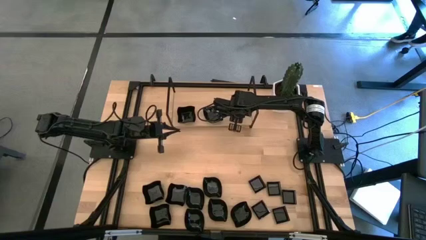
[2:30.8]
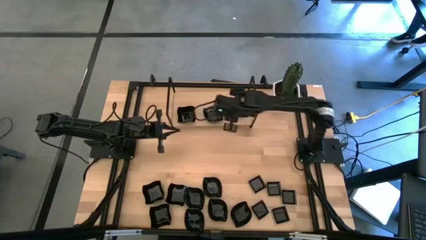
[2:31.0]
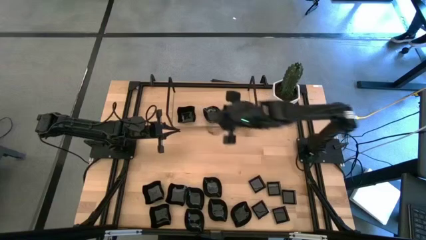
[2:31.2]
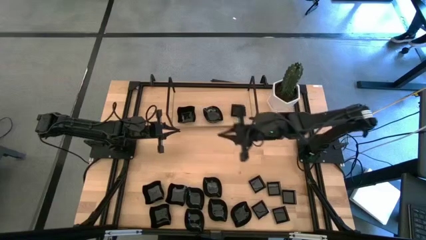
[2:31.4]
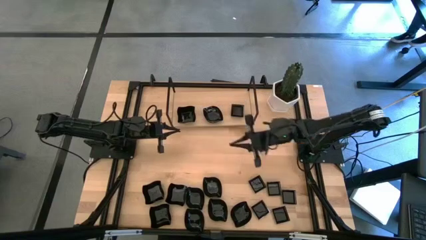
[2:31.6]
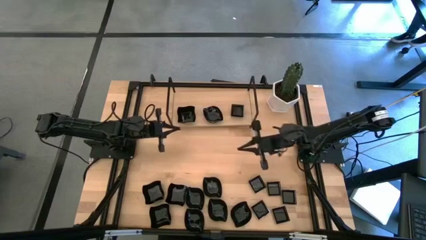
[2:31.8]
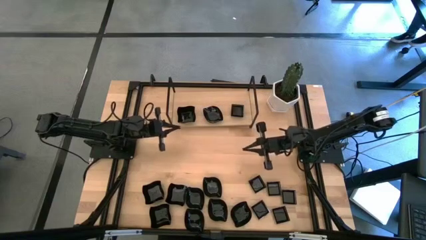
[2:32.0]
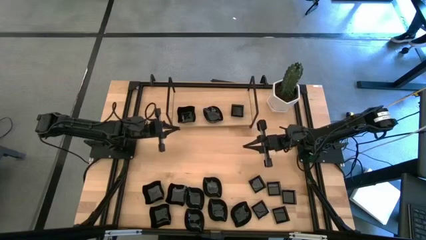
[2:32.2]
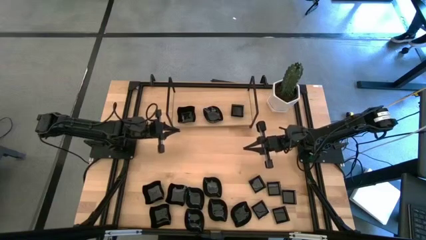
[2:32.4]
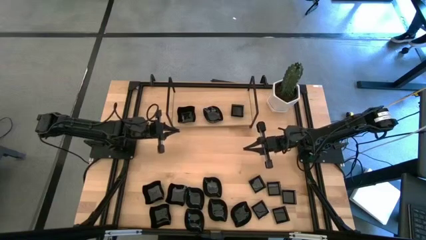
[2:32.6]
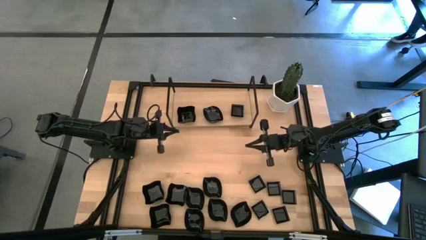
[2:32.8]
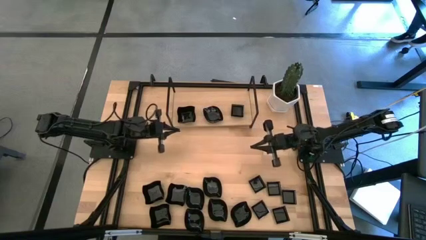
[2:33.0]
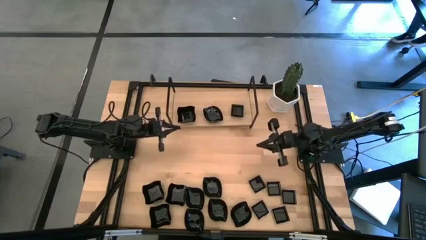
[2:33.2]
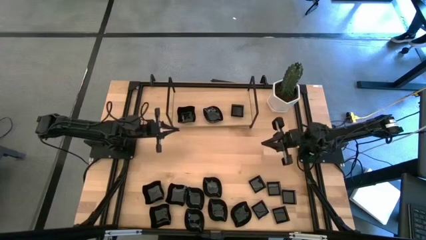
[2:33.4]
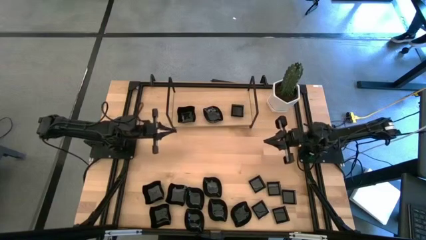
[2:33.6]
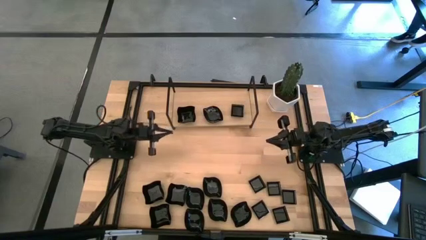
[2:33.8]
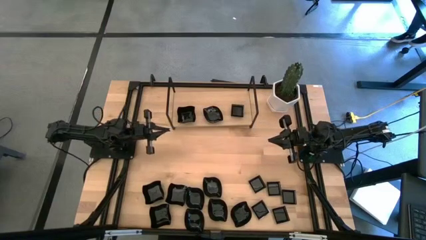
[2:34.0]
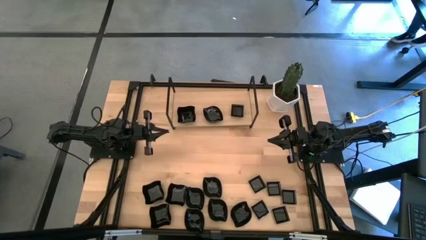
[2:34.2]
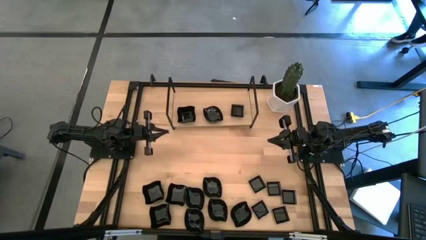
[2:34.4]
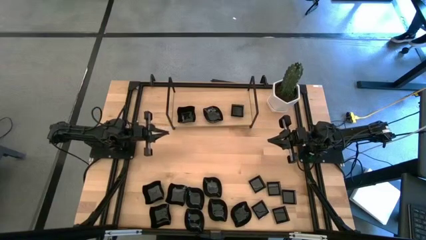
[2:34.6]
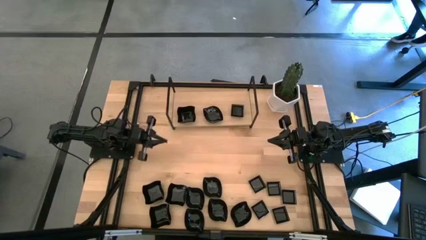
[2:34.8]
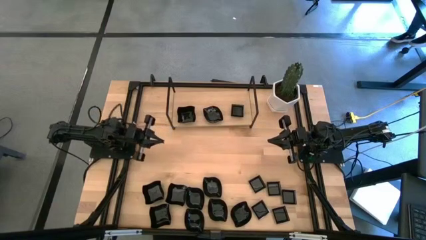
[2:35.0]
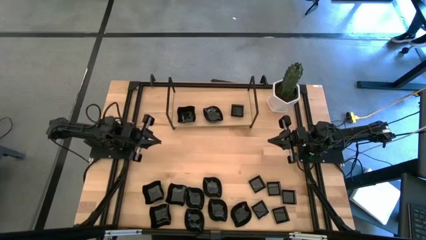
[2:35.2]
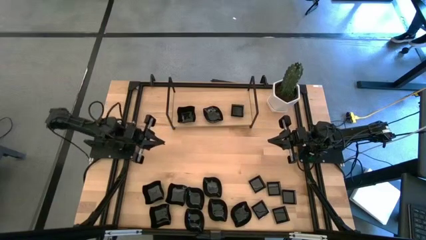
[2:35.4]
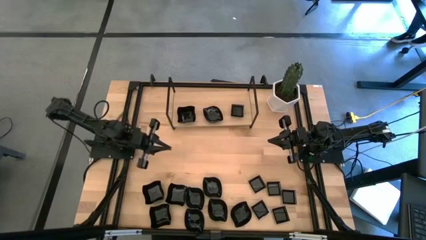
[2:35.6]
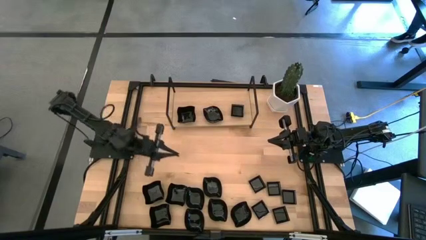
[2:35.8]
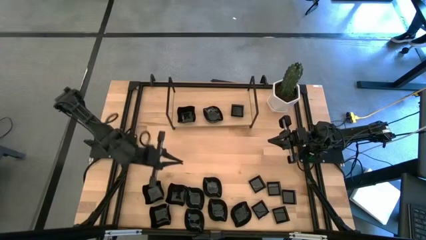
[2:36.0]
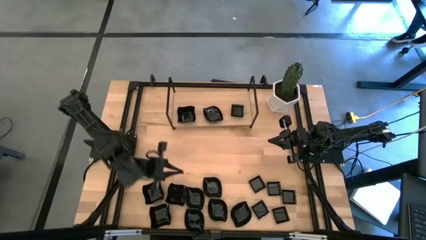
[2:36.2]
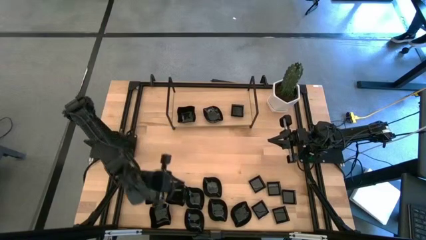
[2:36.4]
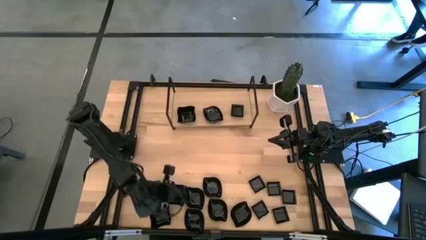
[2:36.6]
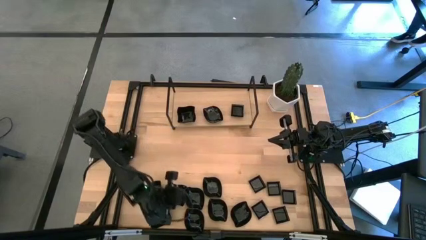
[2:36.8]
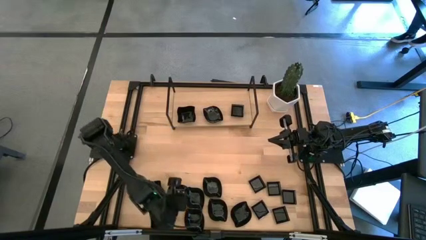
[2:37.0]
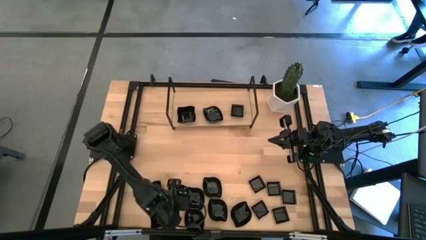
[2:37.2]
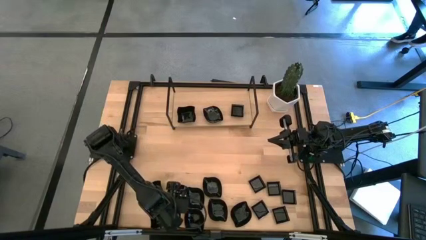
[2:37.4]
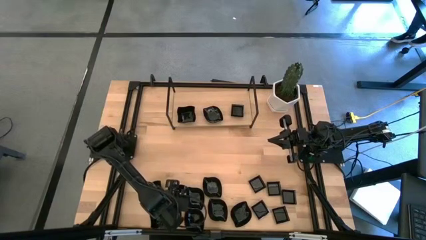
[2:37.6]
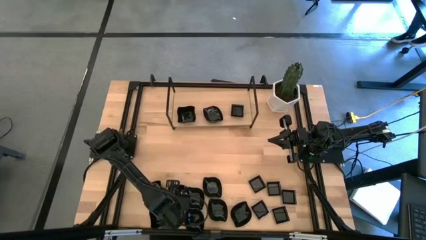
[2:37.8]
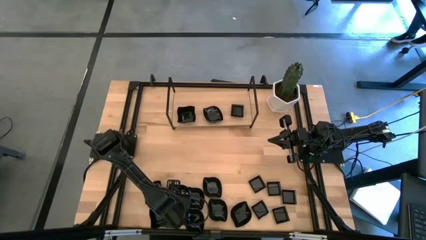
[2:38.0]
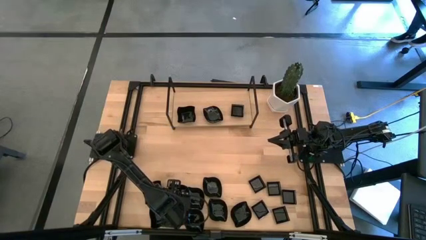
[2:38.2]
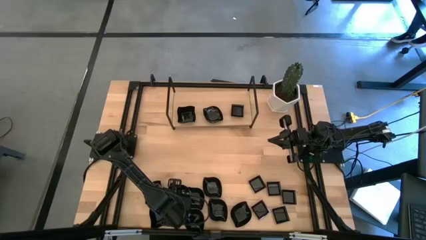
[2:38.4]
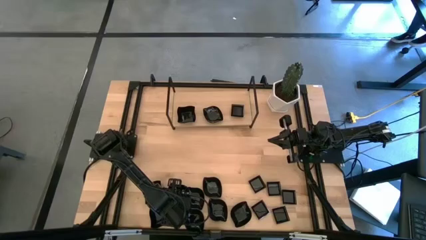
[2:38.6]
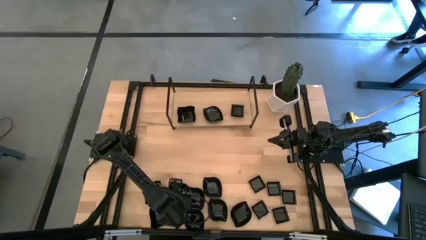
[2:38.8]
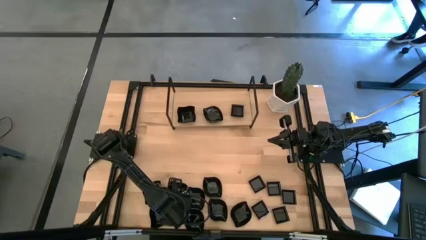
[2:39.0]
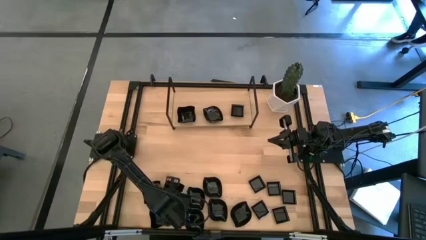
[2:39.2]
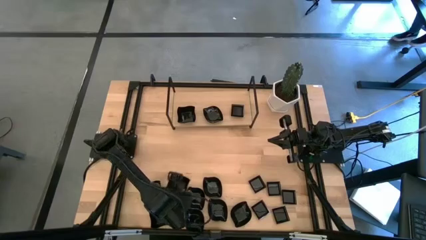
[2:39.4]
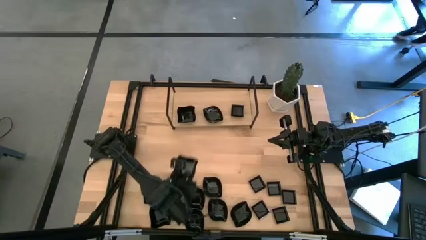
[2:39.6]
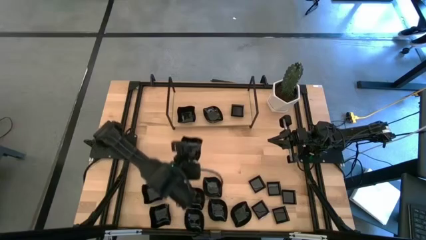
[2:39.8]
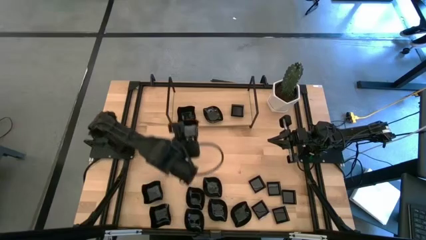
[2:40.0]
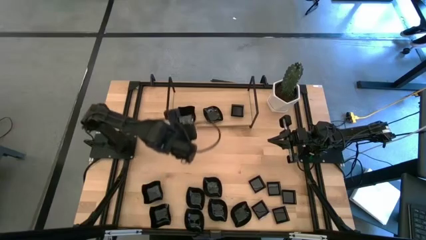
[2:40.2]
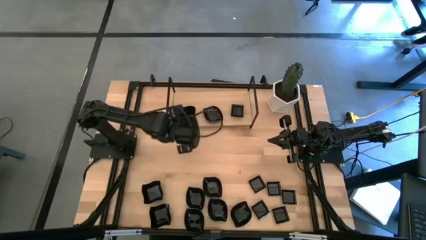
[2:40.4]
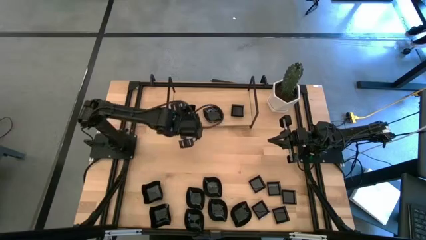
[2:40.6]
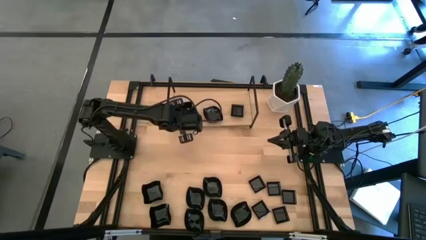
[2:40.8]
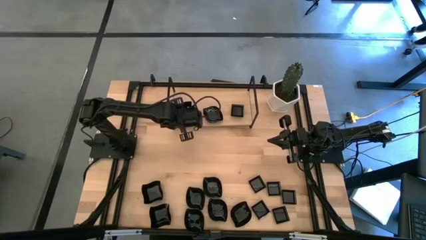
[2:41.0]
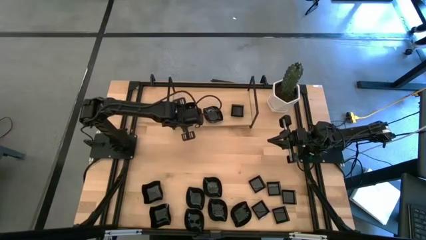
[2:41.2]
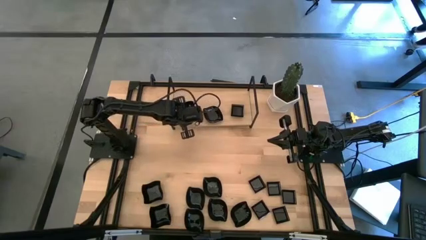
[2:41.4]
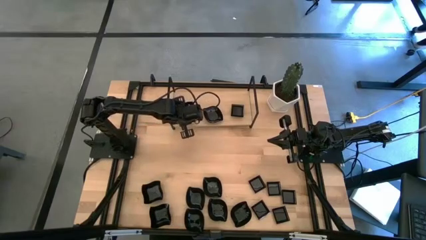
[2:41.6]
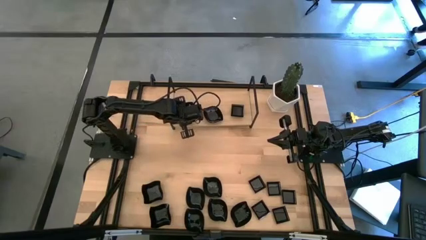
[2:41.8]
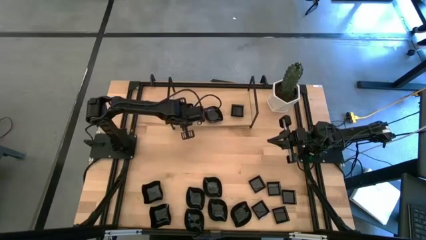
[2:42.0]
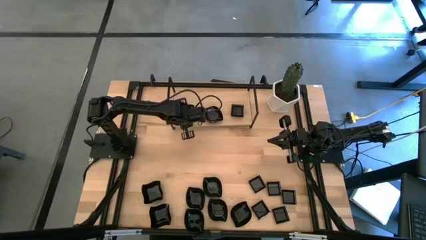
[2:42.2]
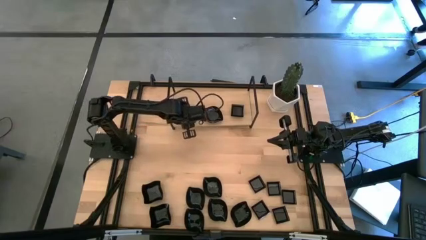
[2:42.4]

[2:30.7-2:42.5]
Task: Pick & Place Mini shaped plates
Stack the black distorted square plate on top of the black distorted square plate on the shelf

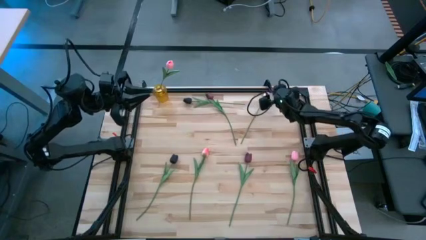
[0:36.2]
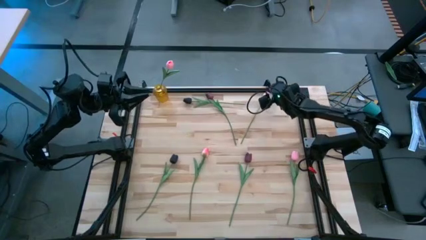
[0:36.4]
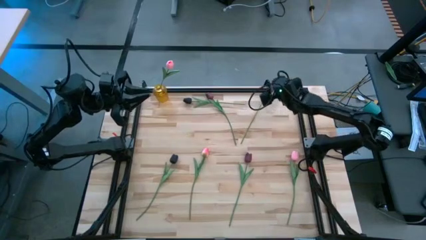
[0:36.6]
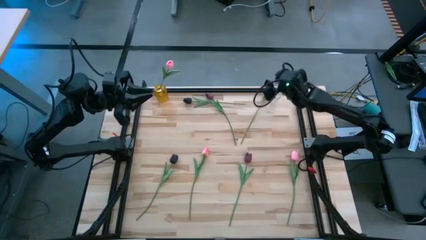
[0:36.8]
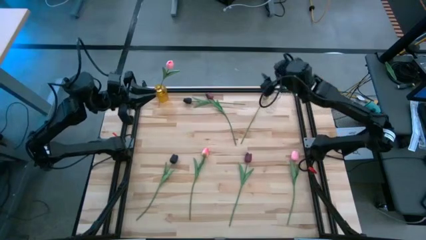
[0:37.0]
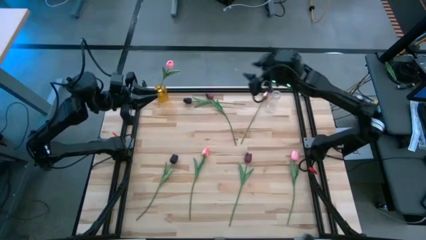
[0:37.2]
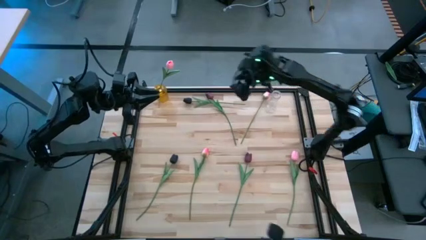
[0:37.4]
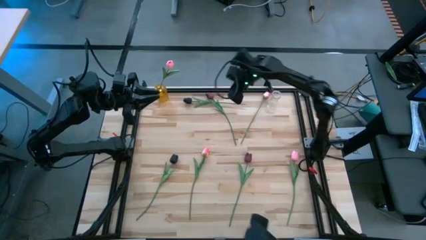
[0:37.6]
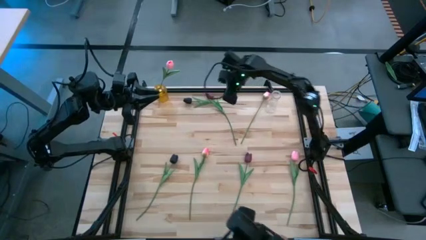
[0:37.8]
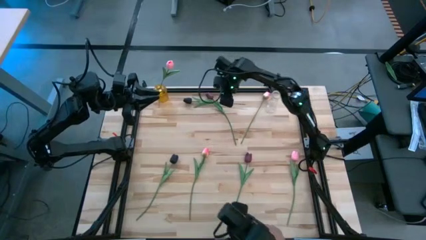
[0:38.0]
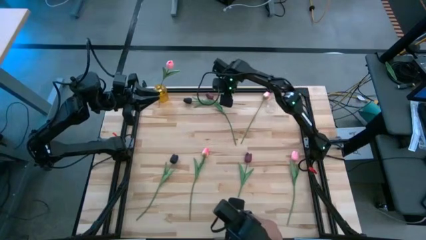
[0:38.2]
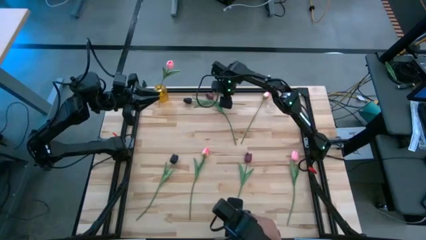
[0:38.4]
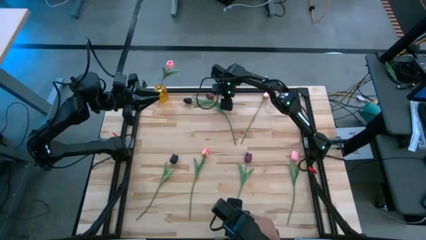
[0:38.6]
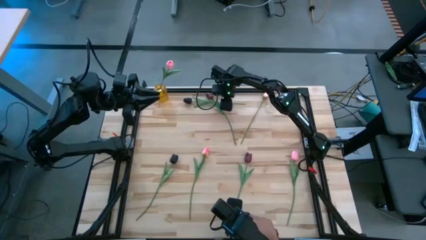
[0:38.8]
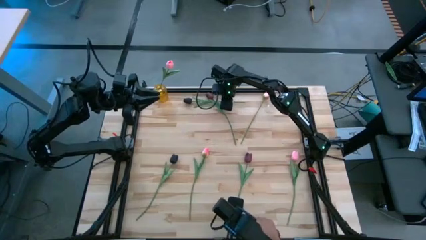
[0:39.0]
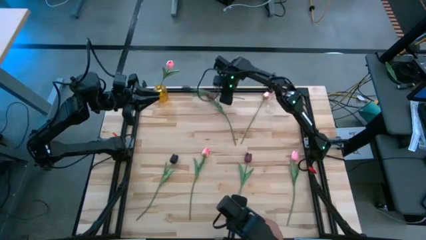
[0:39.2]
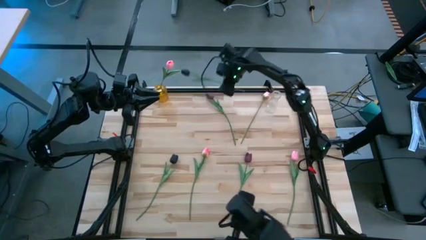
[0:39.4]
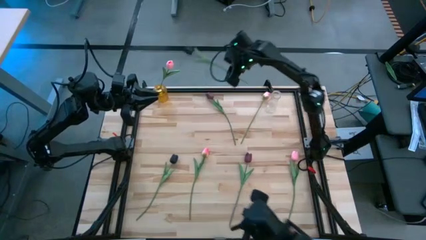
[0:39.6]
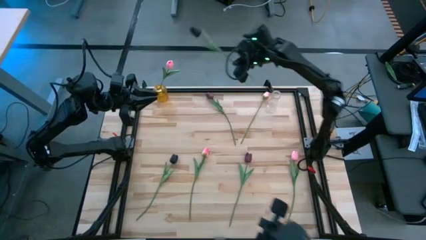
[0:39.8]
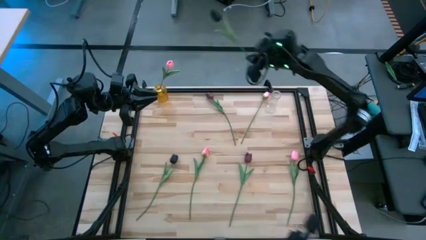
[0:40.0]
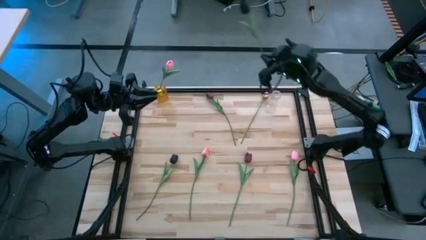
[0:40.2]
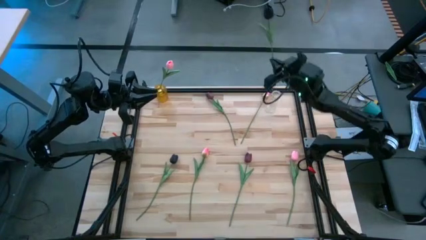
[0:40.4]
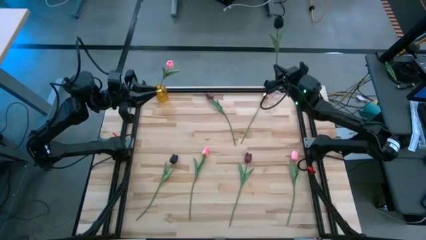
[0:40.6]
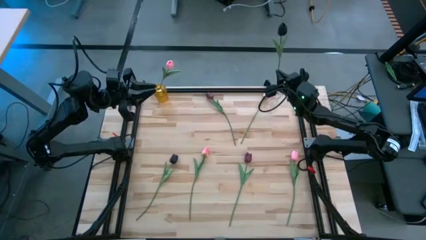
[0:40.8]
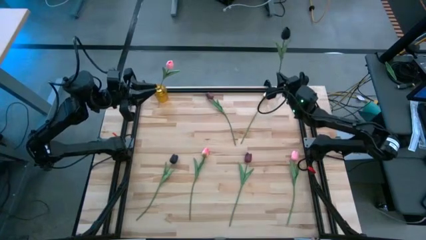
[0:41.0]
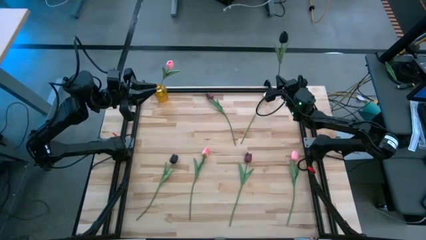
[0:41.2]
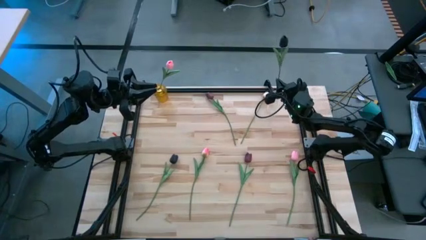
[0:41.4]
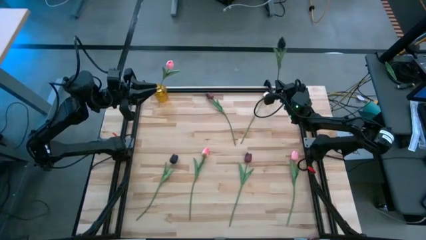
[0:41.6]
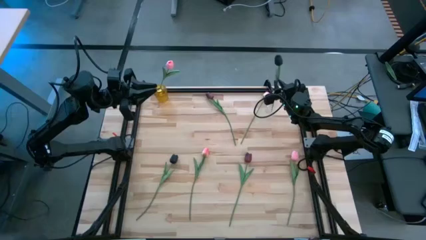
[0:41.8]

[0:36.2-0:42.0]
Task: Sort flowers into vase by color
Insert the top black tulip into the transparent vase
